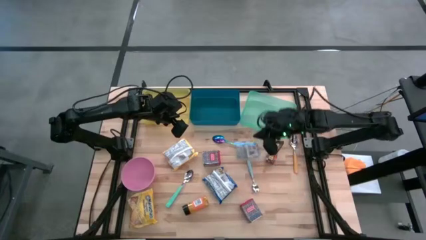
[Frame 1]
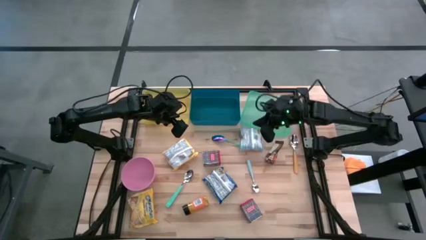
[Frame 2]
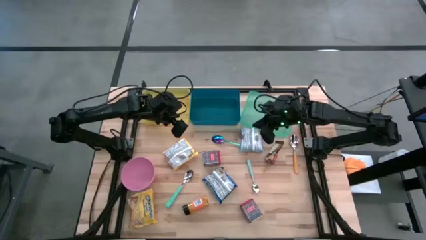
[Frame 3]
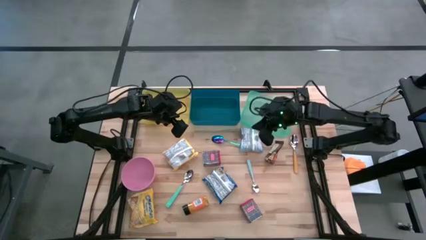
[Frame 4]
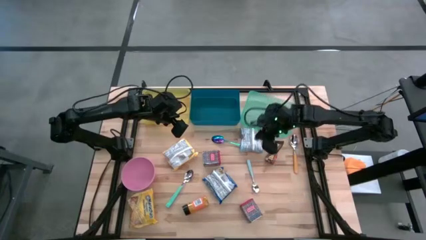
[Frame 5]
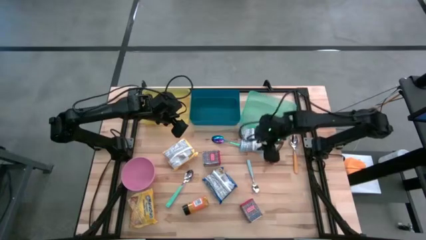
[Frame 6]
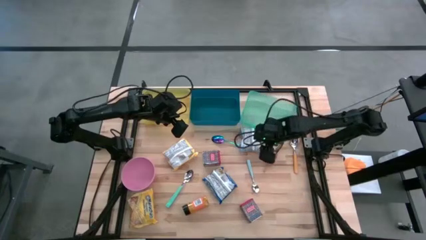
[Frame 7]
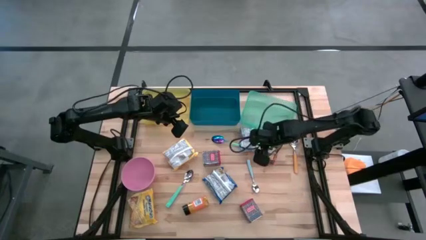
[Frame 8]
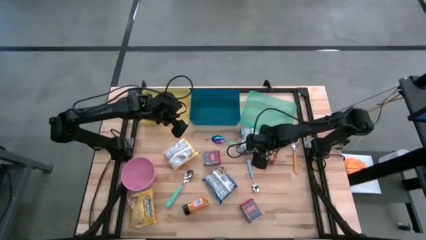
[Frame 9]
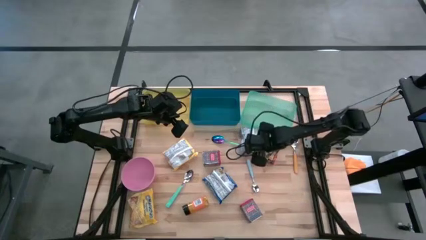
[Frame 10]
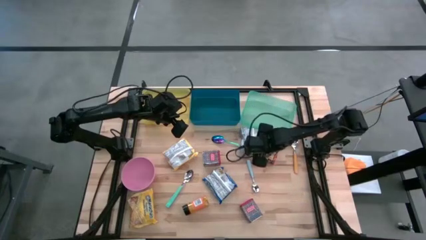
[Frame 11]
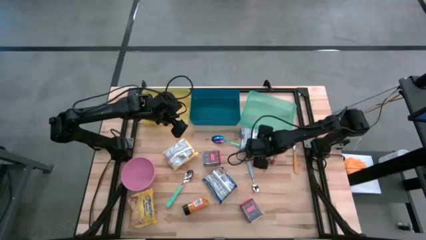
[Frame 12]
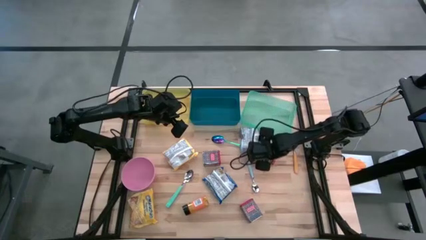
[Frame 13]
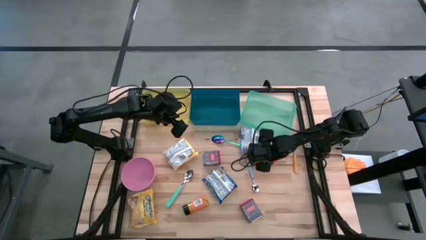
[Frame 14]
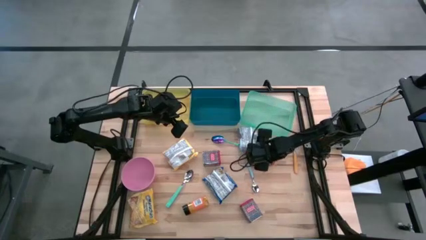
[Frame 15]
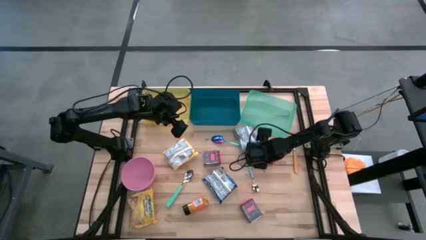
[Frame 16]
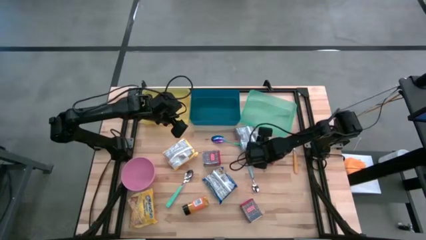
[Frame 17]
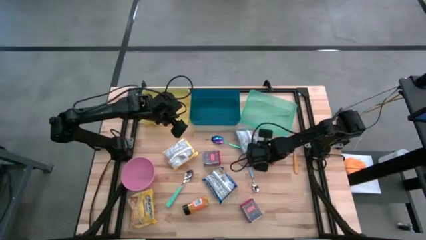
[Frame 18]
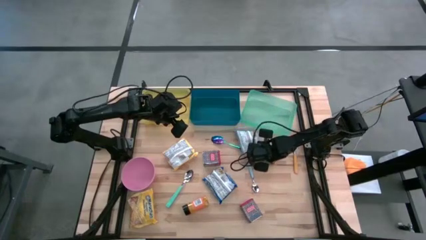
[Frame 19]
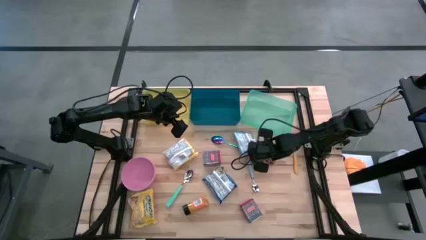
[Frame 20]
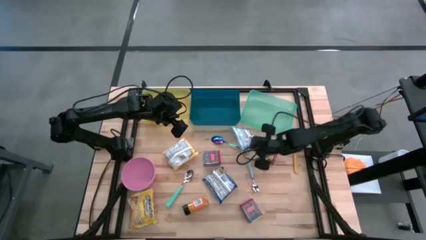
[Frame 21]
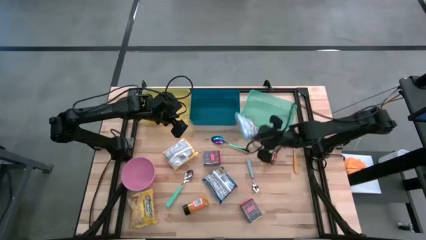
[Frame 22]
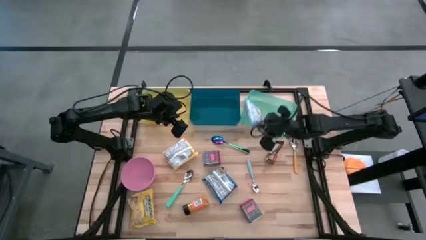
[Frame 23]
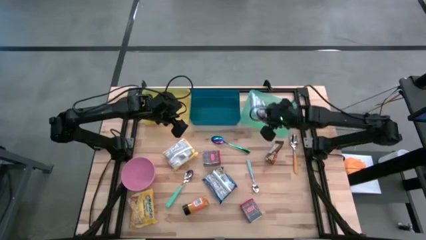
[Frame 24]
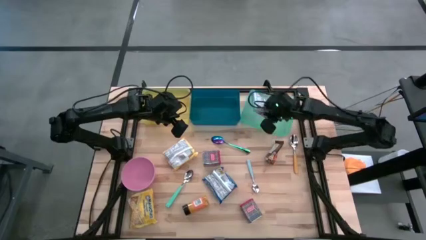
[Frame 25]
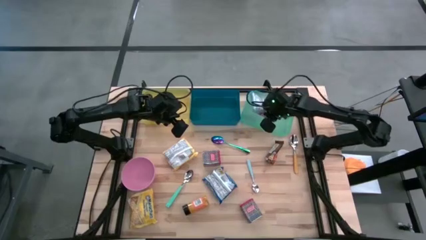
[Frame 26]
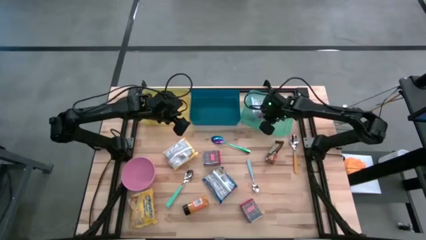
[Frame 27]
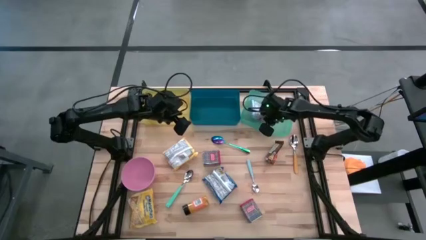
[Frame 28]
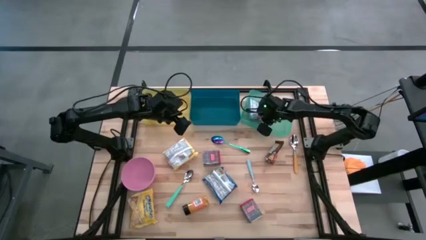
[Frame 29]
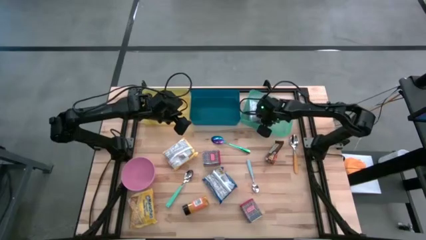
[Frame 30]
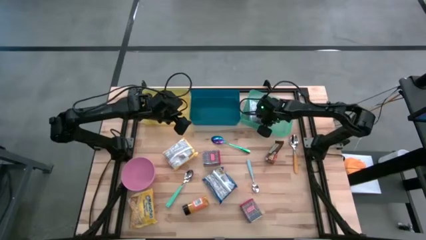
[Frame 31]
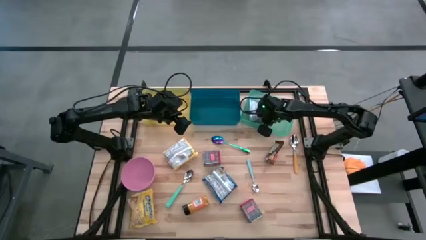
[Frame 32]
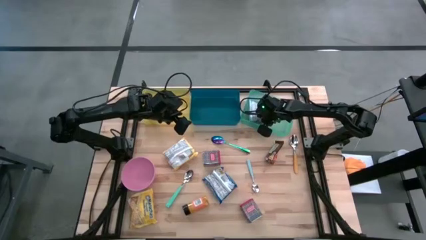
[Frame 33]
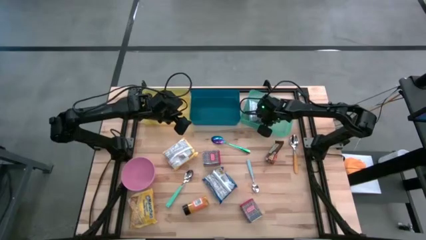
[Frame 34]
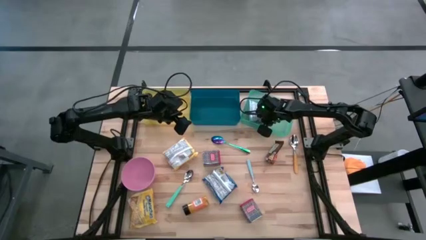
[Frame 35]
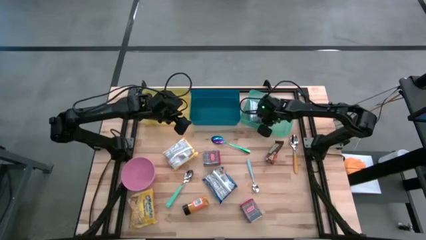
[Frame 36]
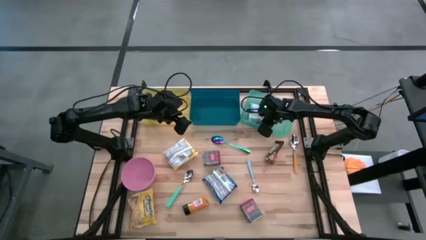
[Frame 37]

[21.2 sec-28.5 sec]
Put the light blue noodle pack into the green bin

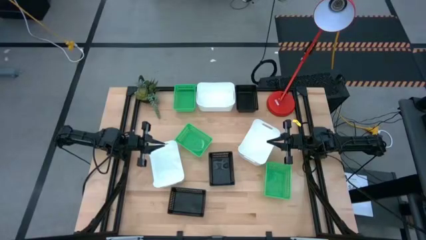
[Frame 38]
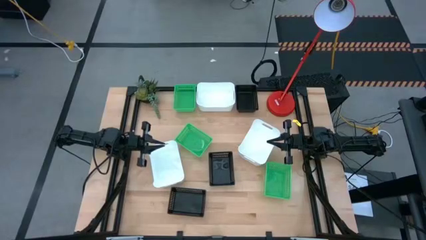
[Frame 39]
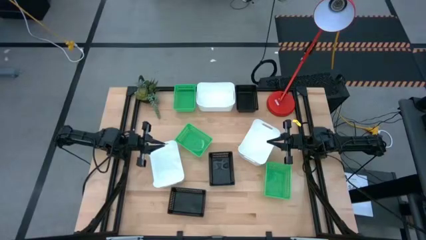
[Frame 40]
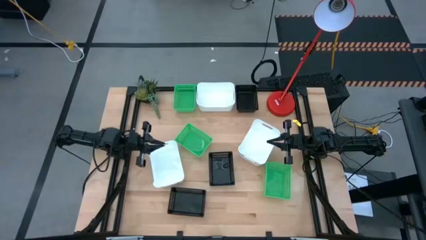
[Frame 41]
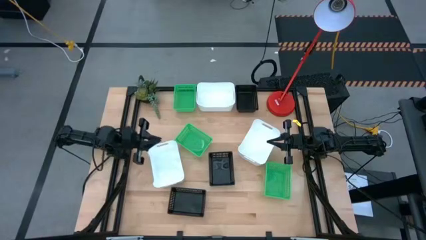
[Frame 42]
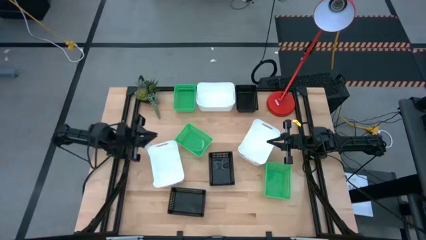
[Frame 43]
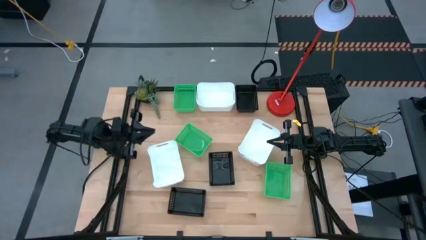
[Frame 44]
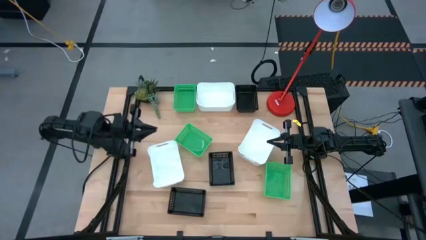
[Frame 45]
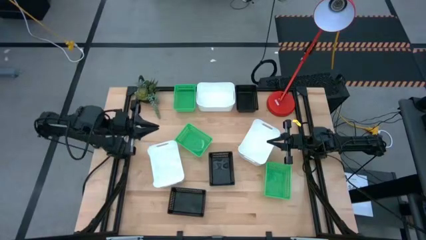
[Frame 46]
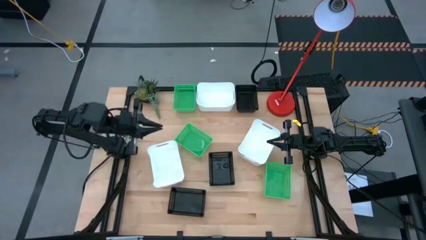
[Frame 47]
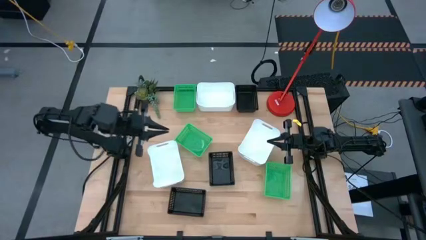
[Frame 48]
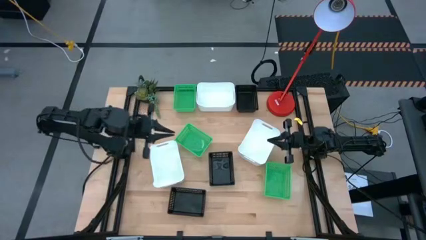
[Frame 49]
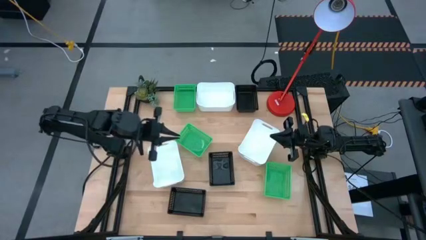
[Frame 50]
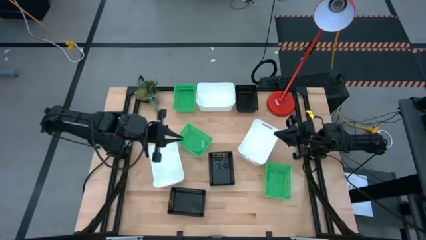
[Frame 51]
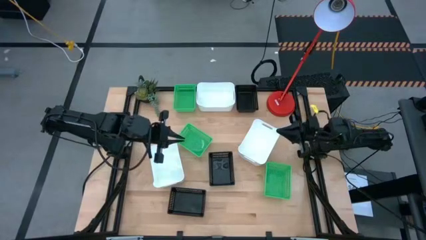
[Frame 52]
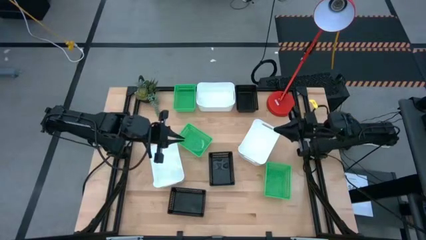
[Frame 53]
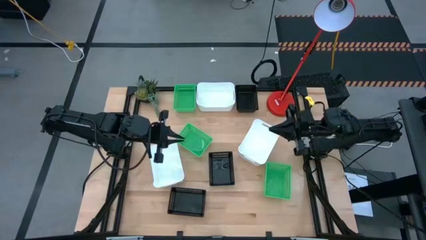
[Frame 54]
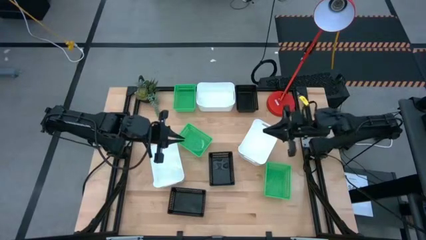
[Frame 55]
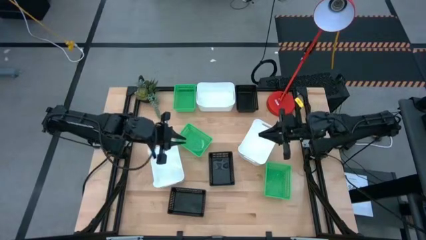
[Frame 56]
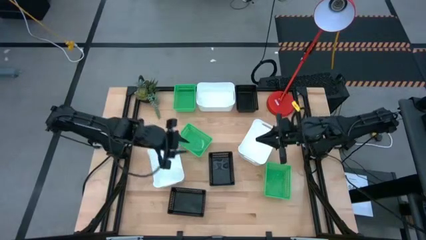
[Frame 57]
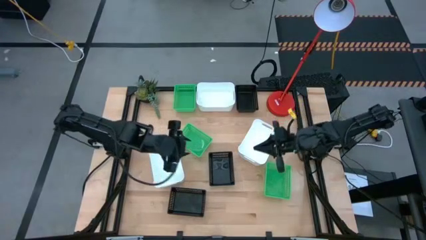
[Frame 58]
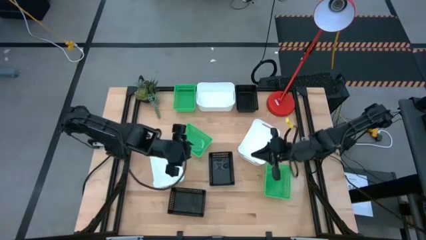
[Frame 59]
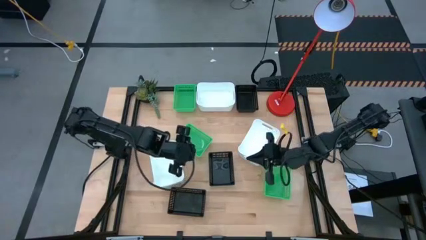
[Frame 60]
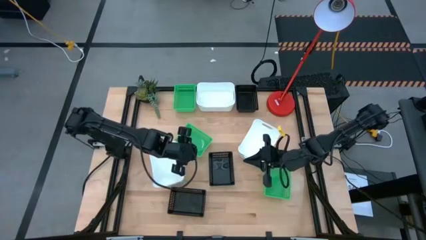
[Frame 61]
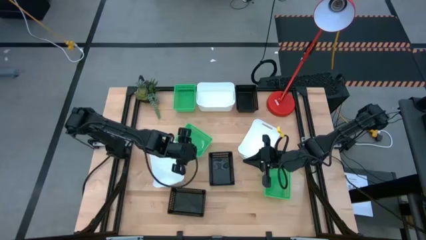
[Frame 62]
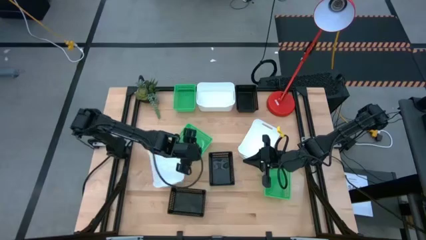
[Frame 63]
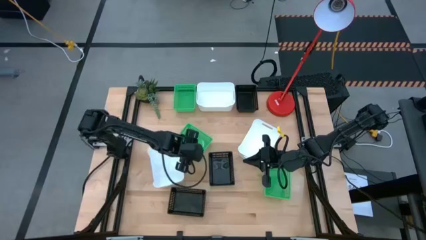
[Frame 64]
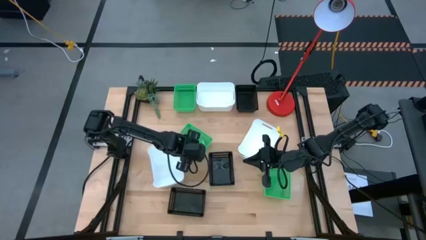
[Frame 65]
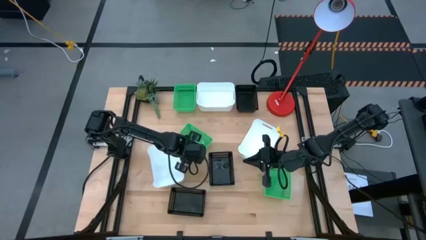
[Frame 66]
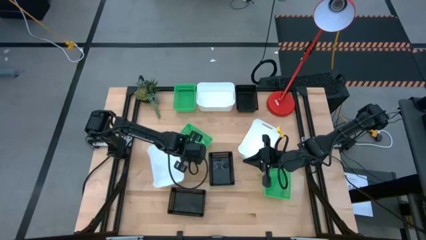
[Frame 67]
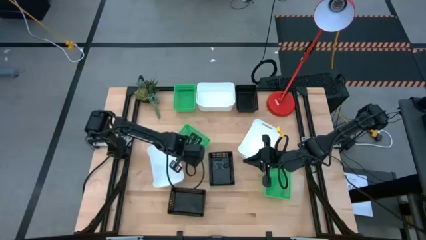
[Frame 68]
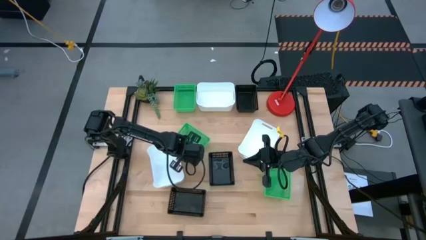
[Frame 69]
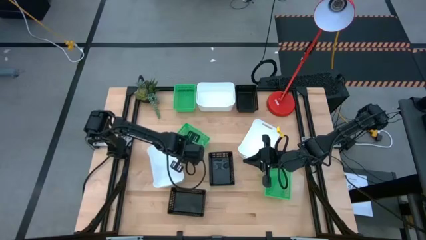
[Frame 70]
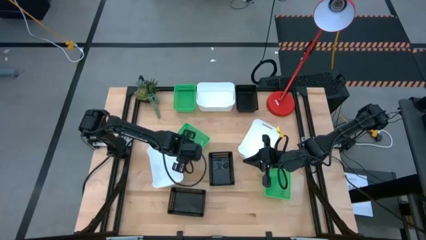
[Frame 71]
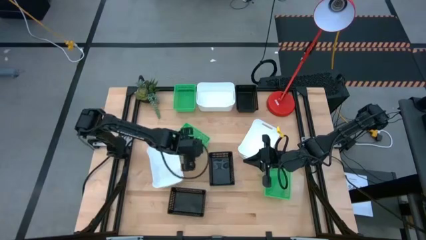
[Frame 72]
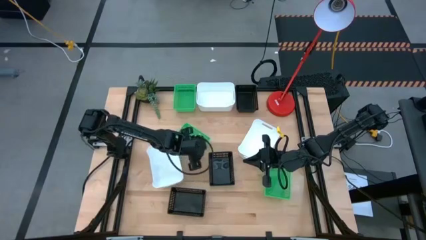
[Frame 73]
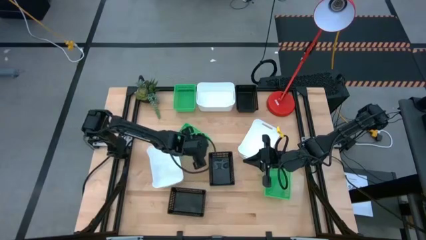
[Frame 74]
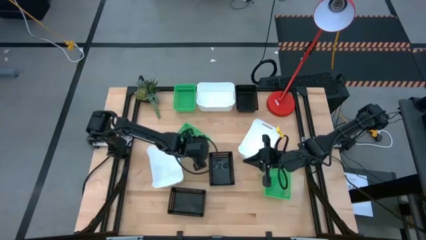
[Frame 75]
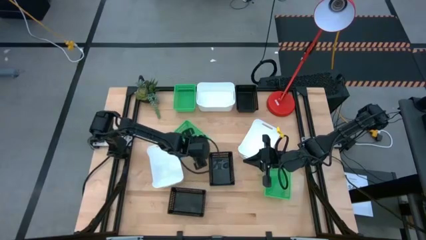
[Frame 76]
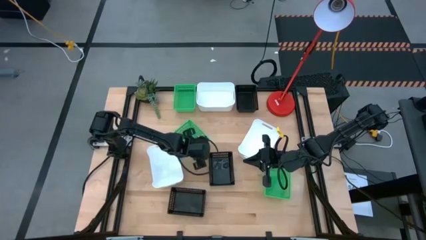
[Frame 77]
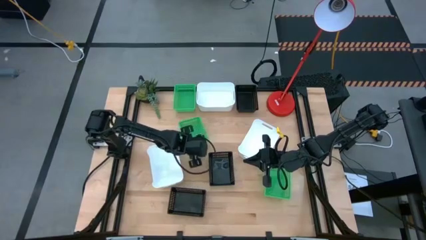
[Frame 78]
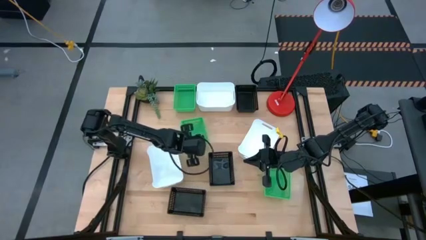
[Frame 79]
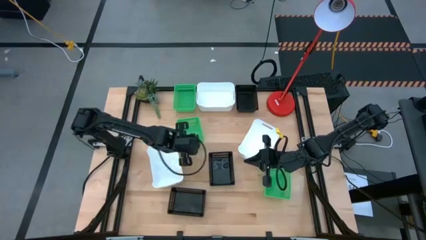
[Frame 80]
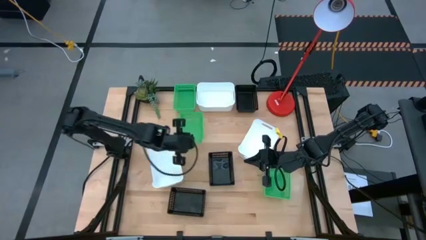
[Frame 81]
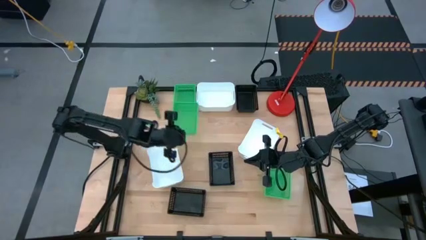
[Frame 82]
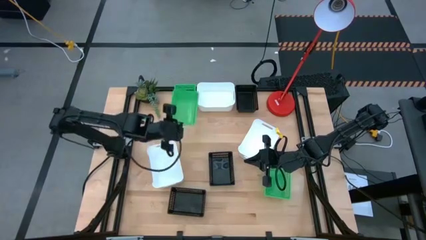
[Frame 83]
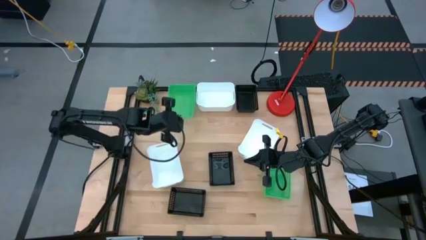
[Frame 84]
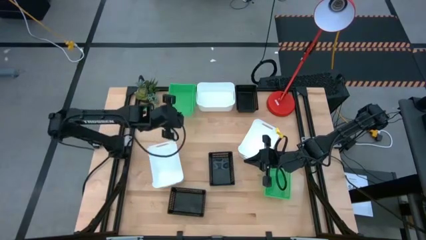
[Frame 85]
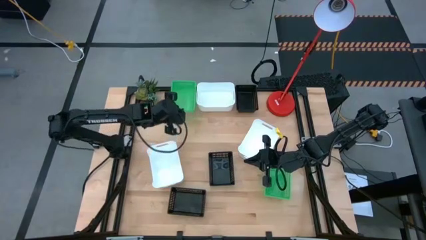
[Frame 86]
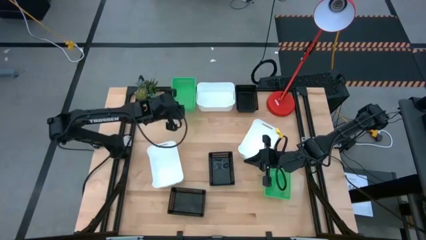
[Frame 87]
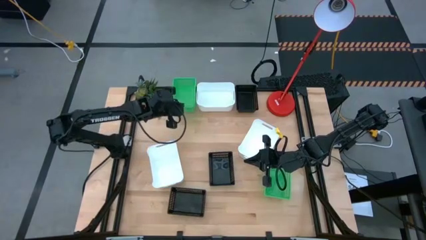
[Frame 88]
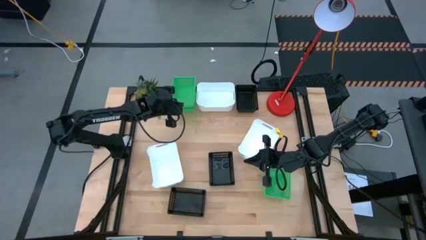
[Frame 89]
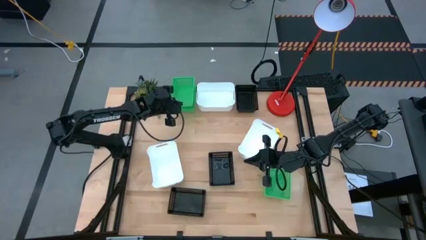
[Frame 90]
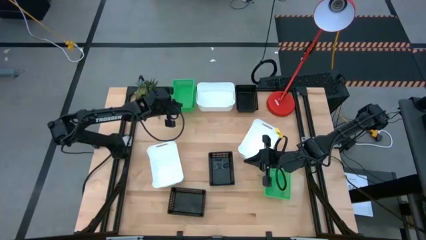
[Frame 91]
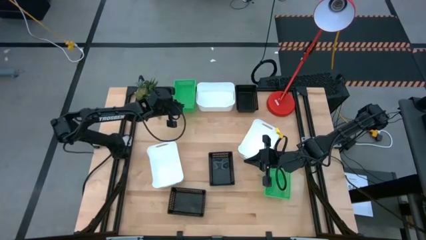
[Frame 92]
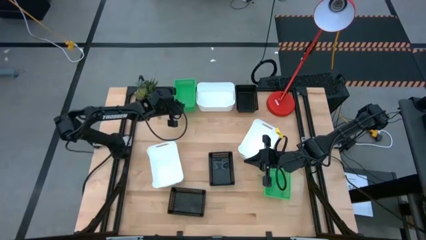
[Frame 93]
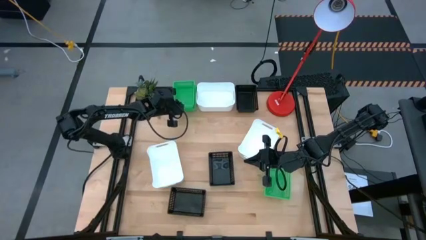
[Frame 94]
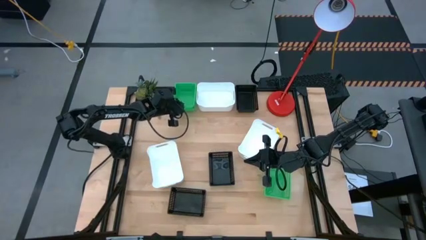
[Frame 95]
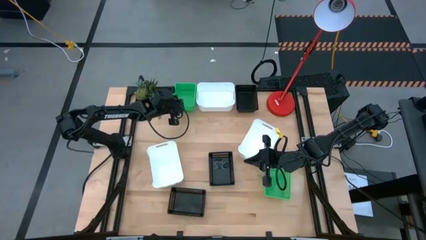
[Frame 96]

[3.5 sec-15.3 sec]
Stack the middle green bin on the top green bin
